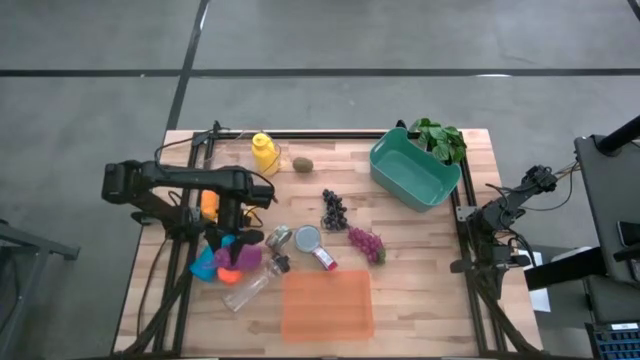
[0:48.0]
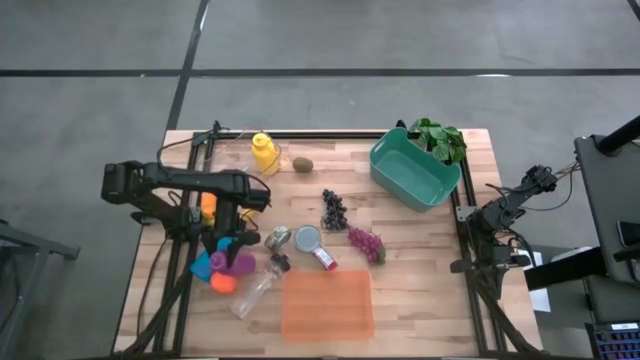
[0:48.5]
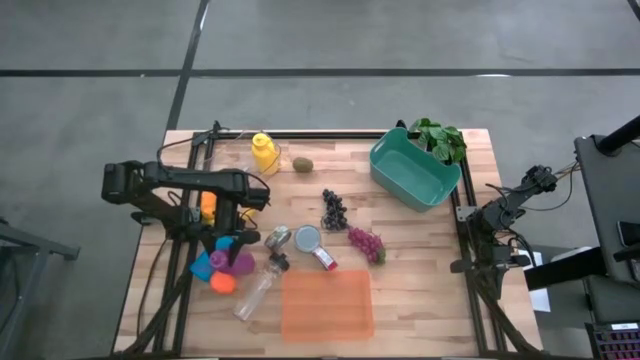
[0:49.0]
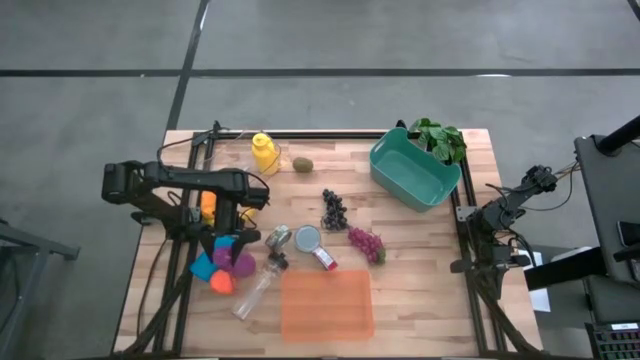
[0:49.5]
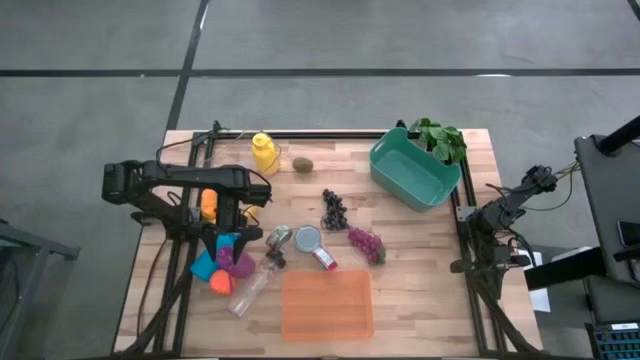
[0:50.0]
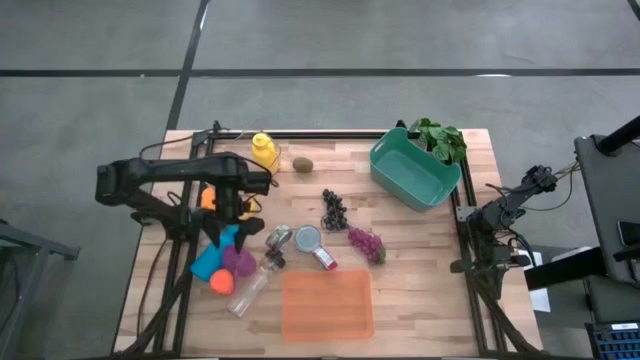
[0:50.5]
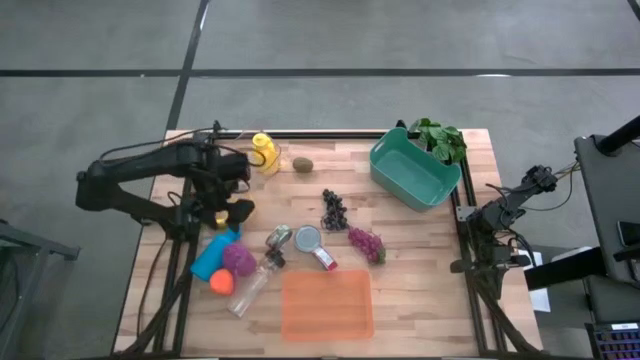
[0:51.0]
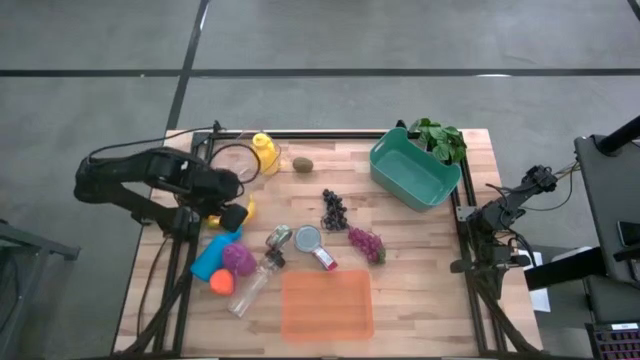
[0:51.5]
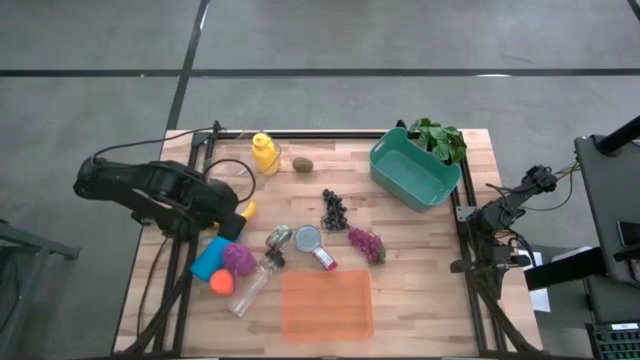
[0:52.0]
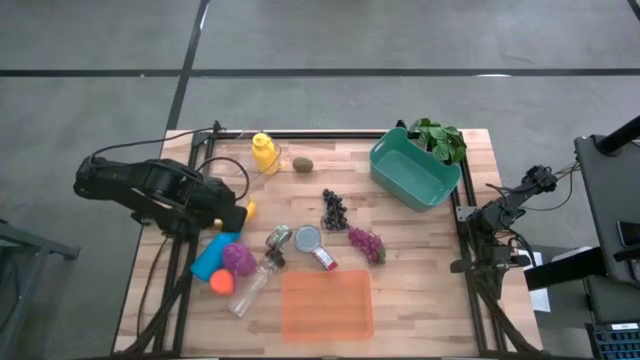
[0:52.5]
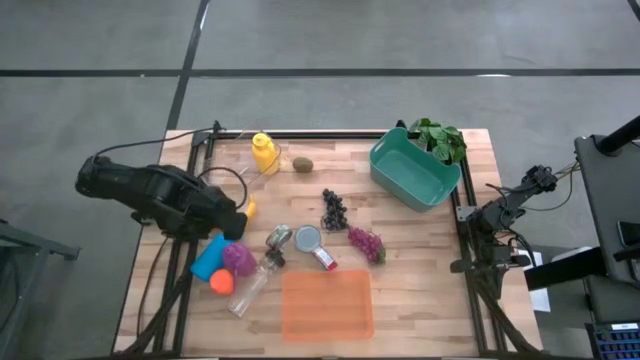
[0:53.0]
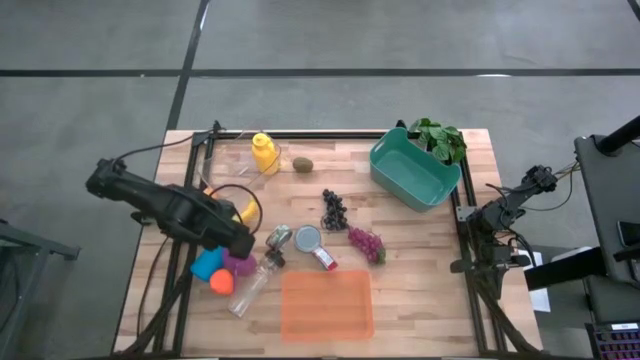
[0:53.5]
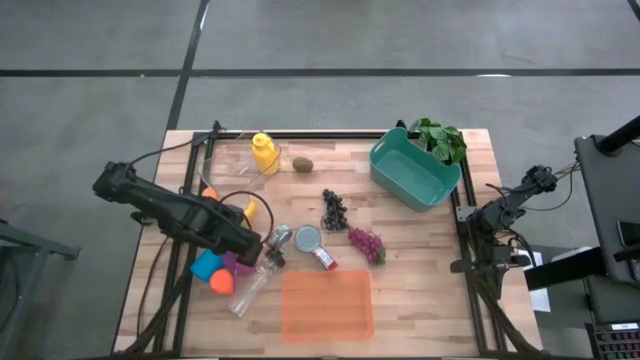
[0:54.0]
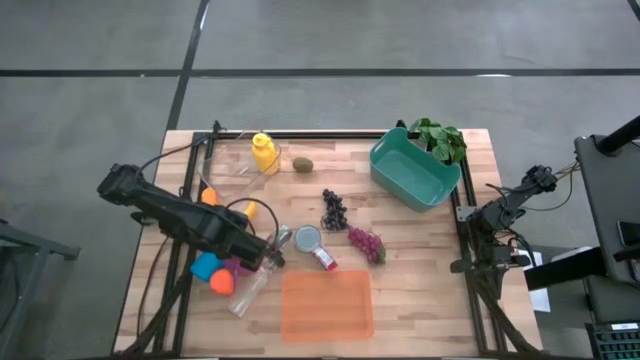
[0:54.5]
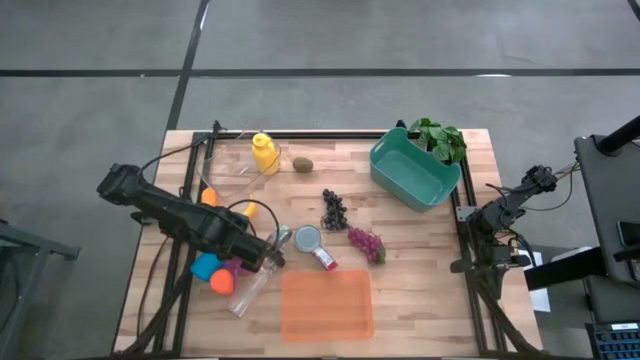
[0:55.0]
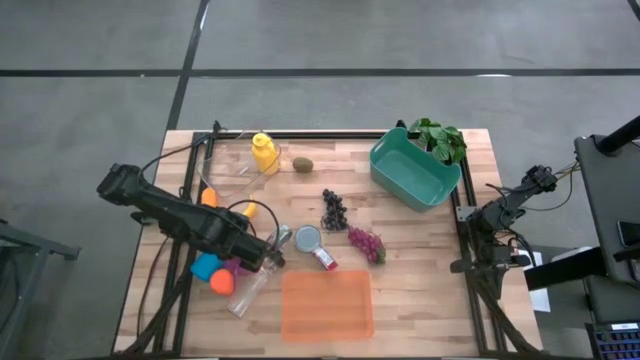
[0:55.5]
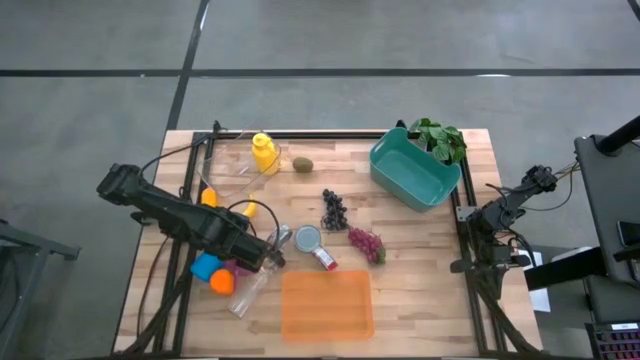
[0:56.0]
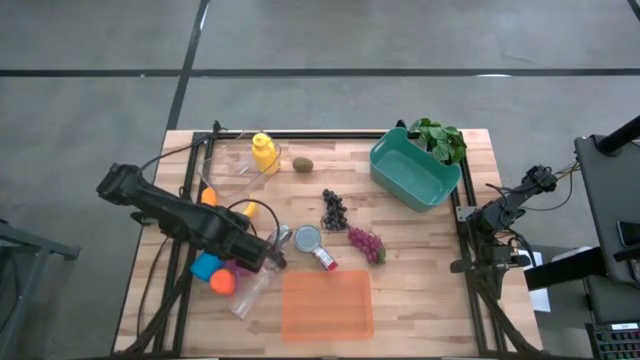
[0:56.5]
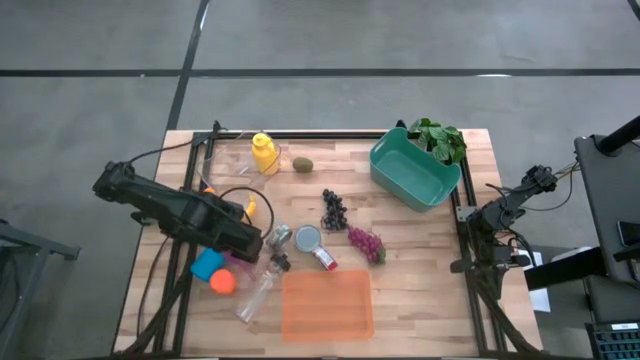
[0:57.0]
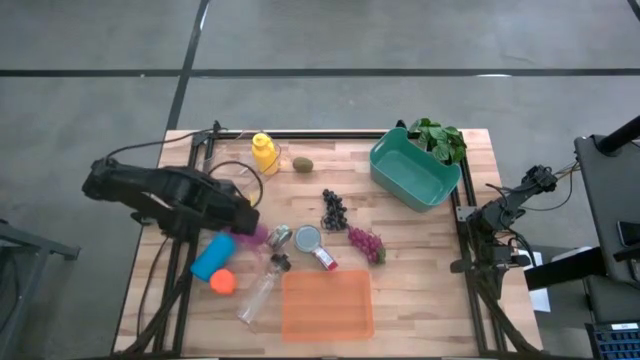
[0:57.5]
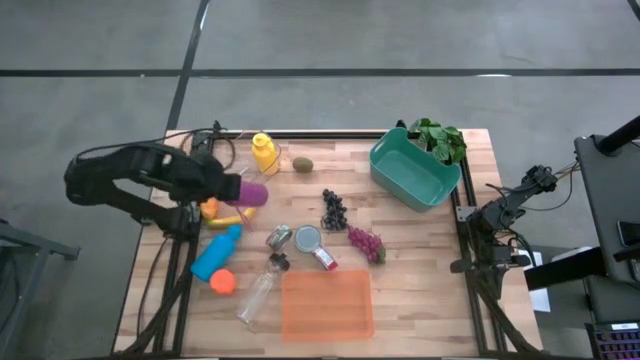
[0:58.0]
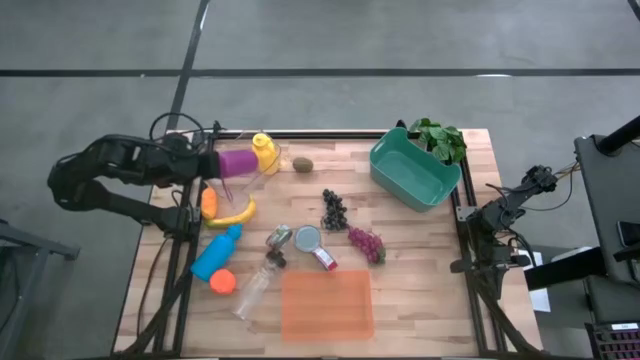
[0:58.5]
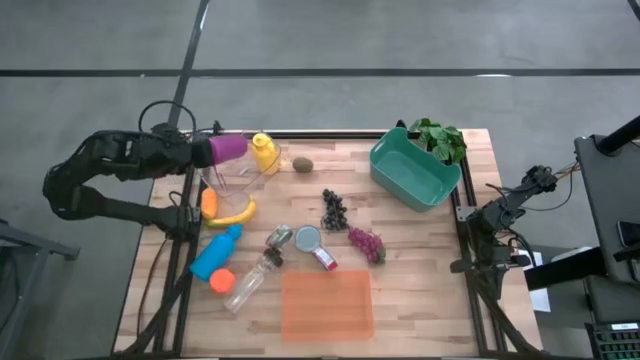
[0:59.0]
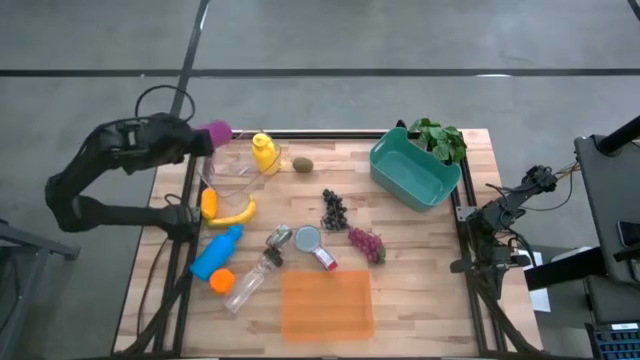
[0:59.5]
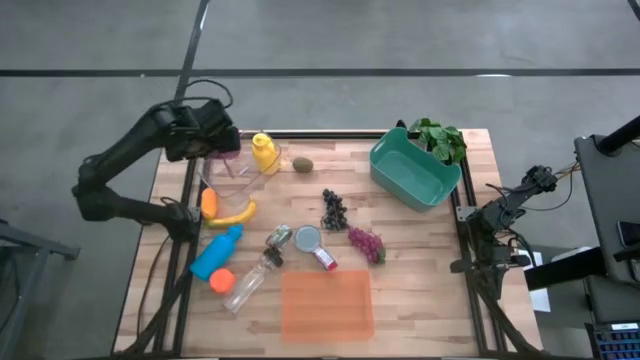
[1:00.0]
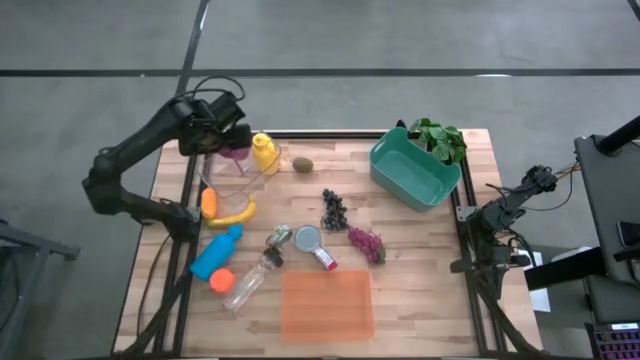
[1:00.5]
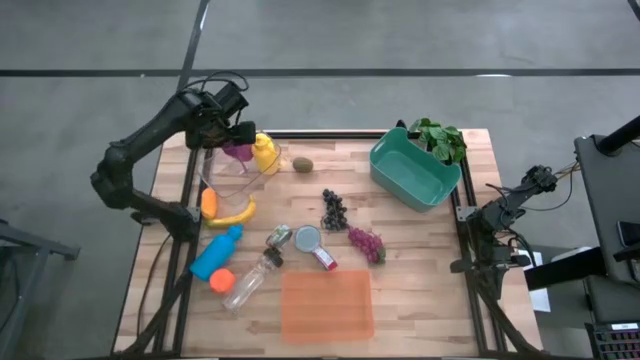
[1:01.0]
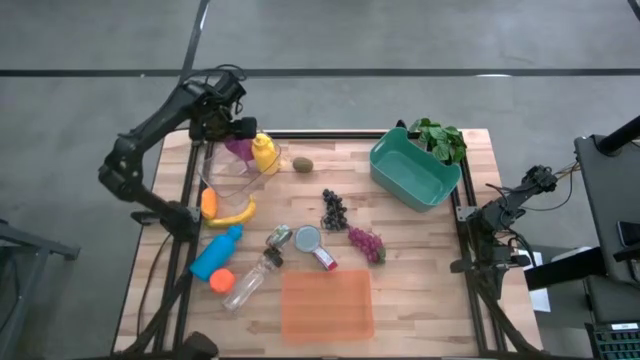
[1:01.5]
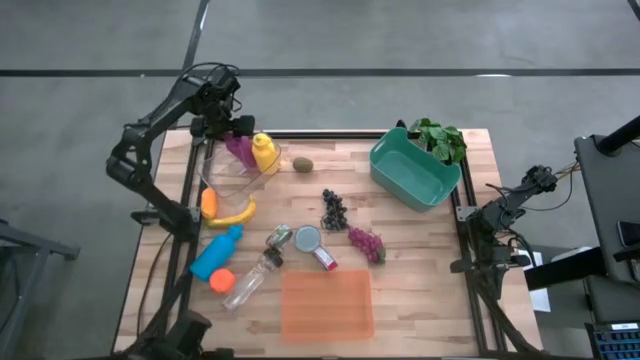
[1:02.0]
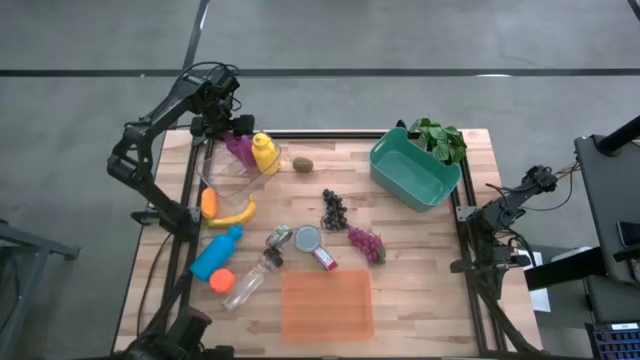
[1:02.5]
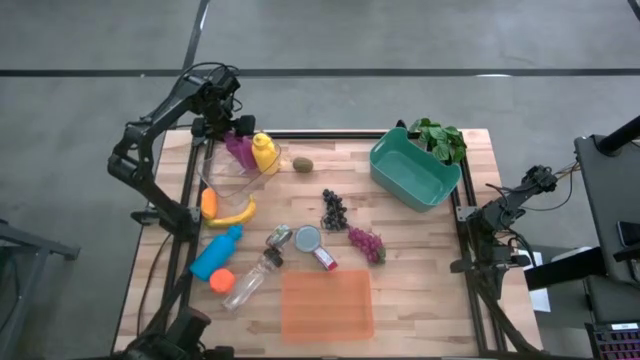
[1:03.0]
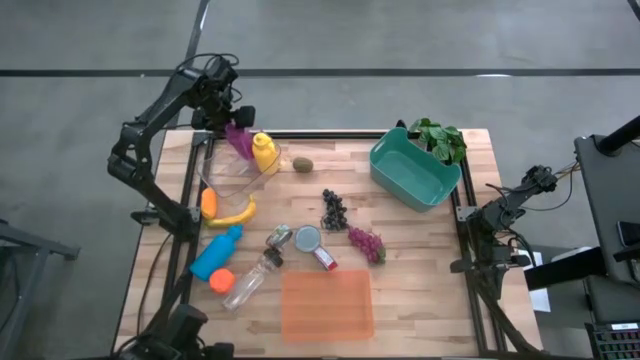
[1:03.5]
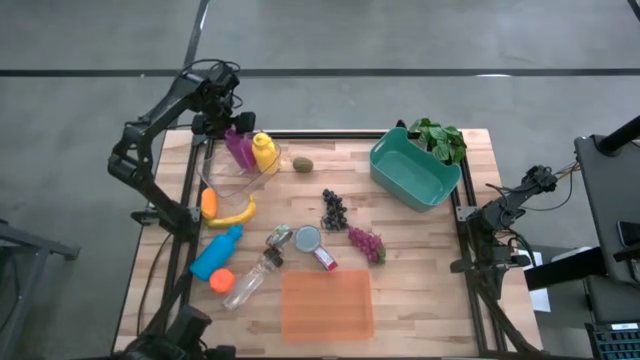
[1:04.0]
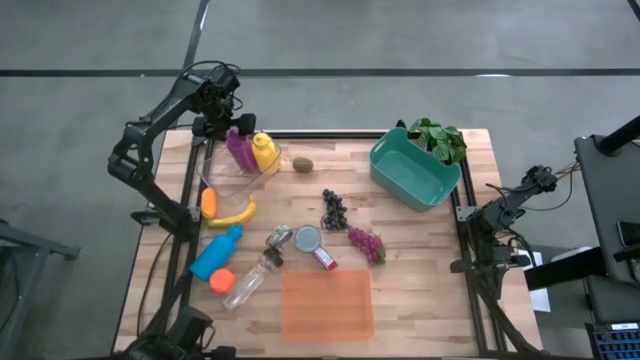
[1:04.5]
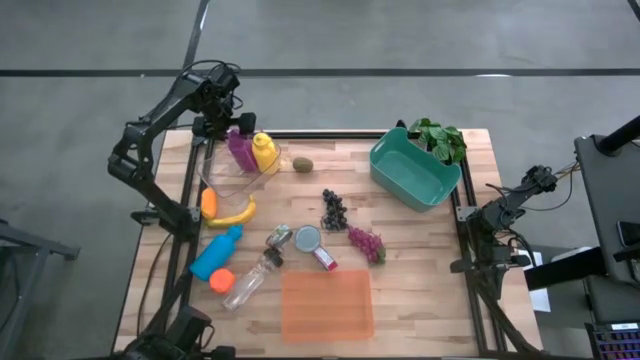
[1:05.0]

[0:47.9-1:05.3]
Task: Pick & Place Food Item
Put the purple water bottle into the transparent bin
